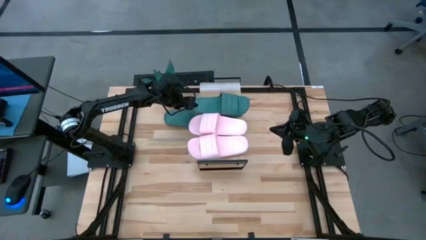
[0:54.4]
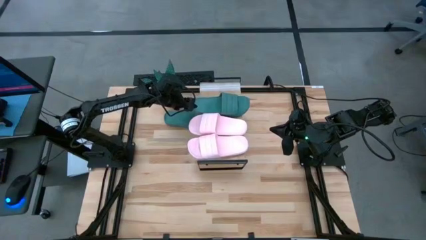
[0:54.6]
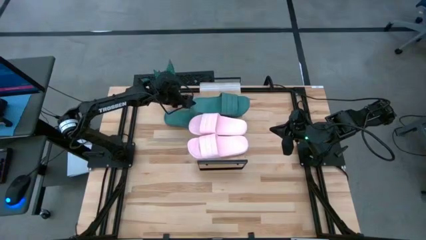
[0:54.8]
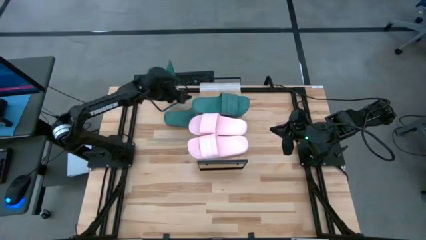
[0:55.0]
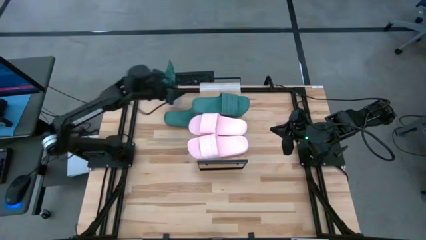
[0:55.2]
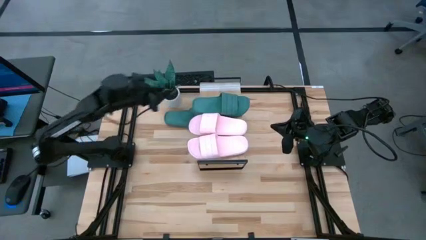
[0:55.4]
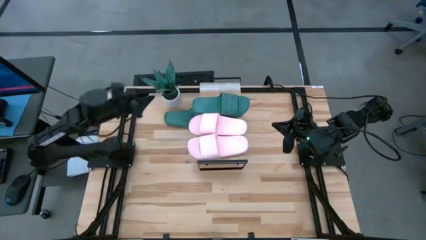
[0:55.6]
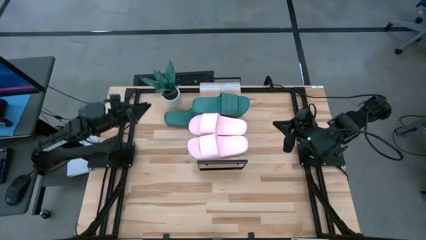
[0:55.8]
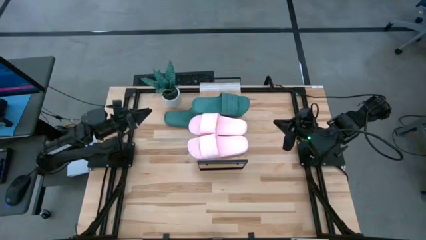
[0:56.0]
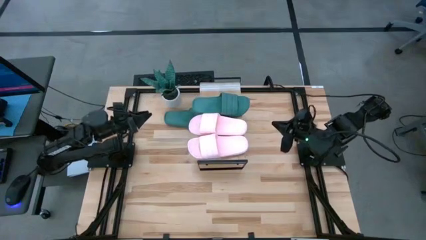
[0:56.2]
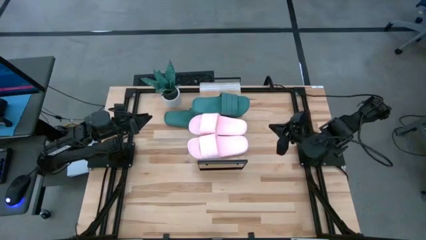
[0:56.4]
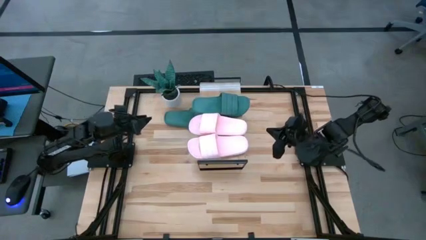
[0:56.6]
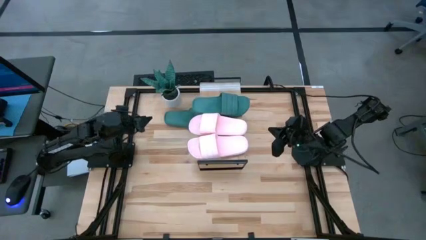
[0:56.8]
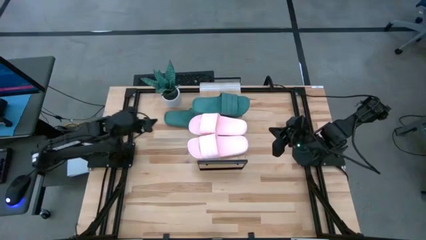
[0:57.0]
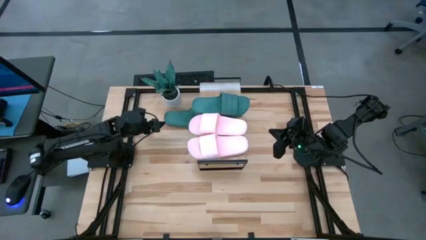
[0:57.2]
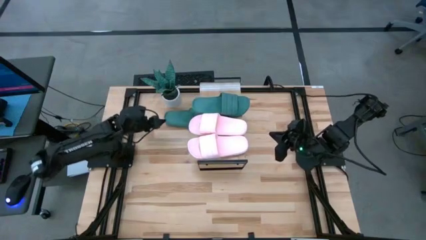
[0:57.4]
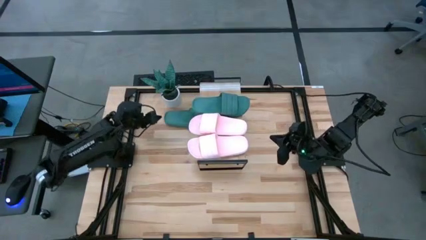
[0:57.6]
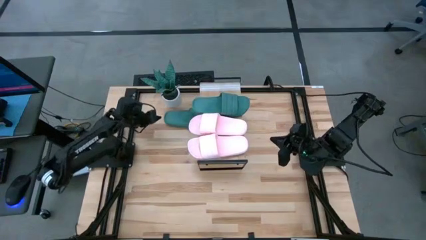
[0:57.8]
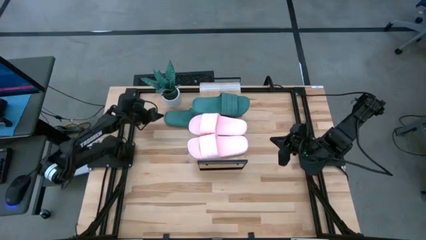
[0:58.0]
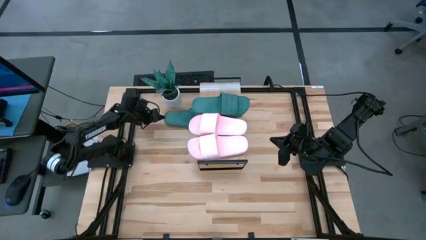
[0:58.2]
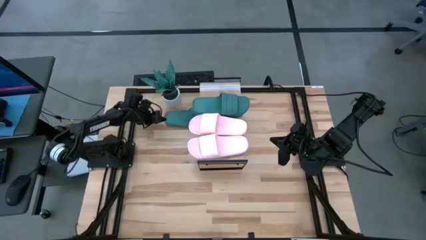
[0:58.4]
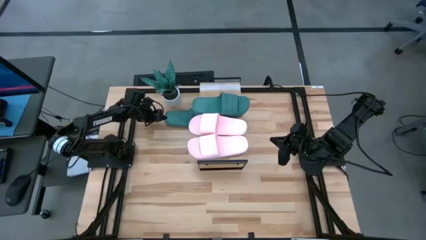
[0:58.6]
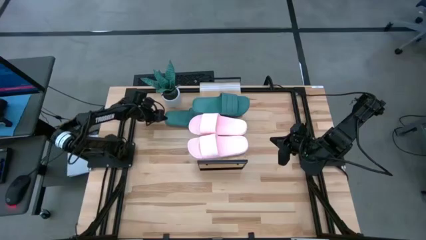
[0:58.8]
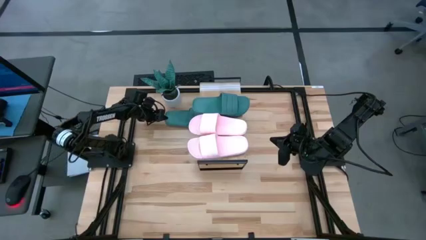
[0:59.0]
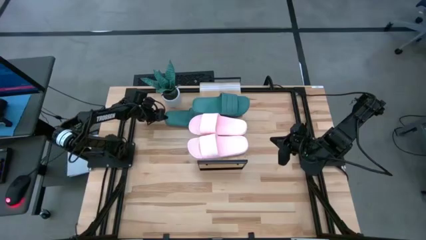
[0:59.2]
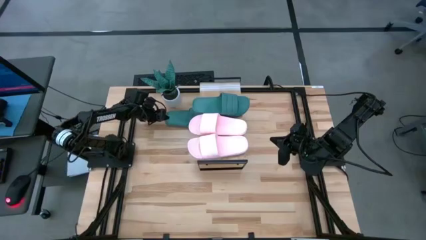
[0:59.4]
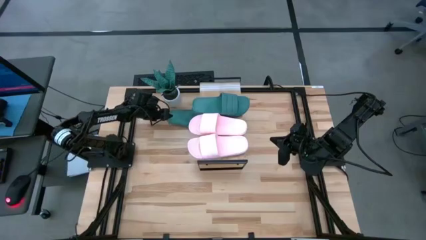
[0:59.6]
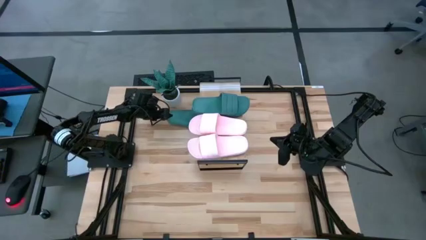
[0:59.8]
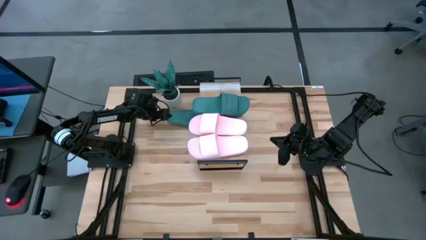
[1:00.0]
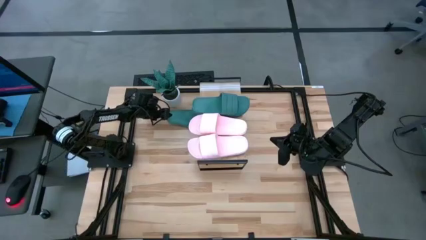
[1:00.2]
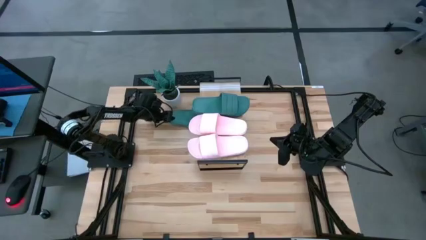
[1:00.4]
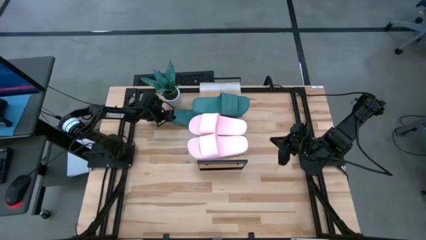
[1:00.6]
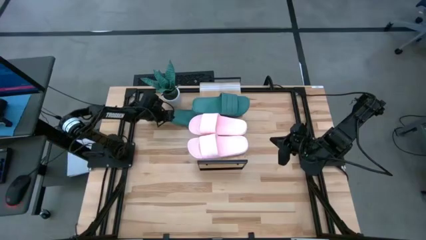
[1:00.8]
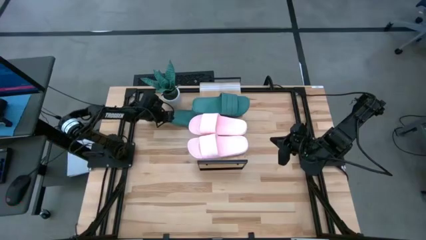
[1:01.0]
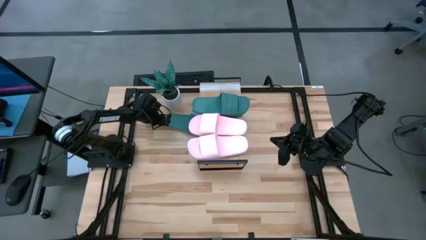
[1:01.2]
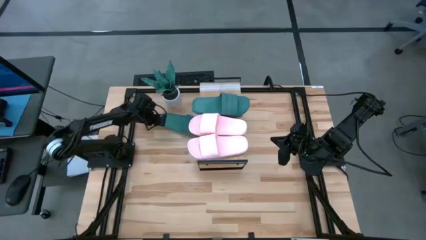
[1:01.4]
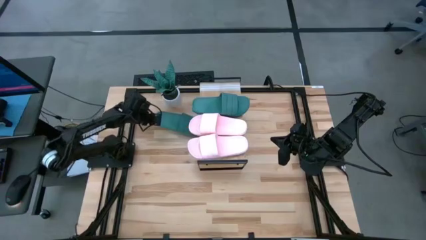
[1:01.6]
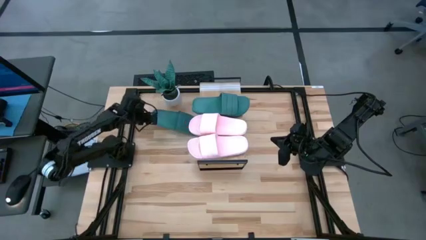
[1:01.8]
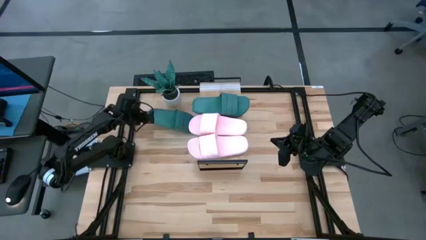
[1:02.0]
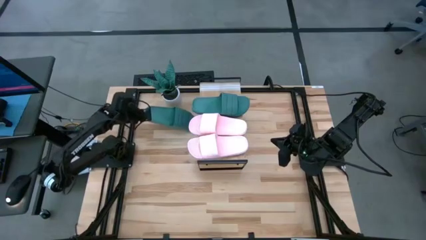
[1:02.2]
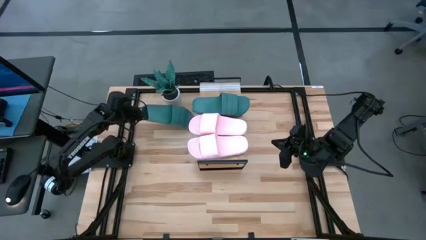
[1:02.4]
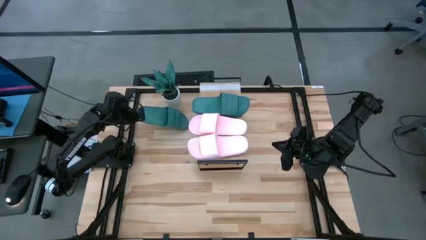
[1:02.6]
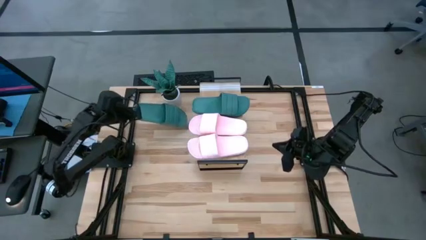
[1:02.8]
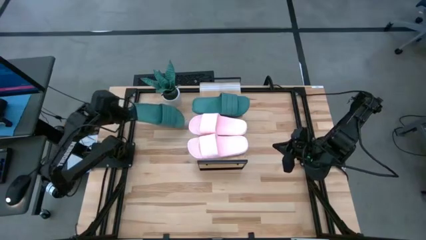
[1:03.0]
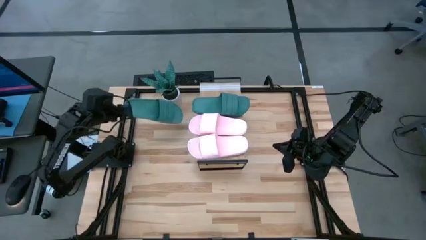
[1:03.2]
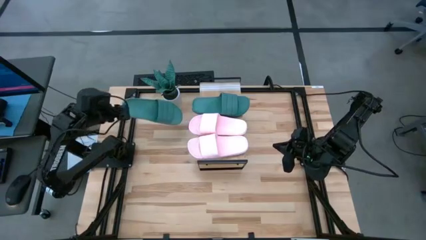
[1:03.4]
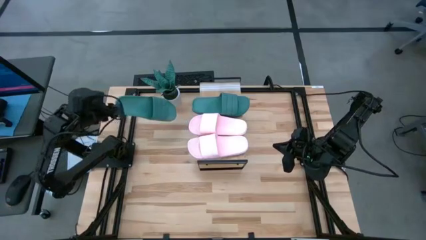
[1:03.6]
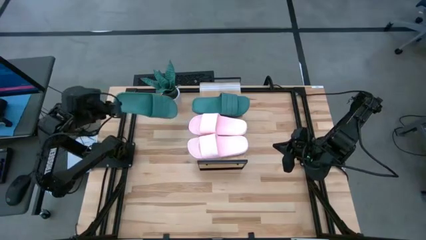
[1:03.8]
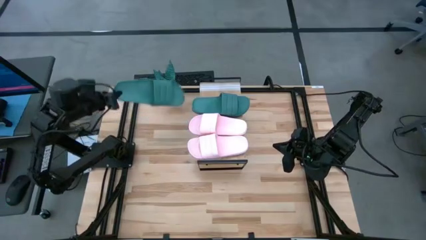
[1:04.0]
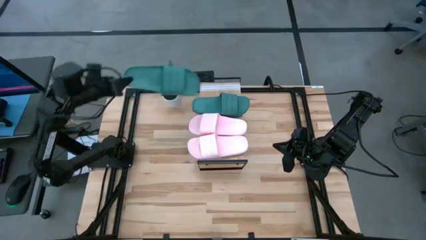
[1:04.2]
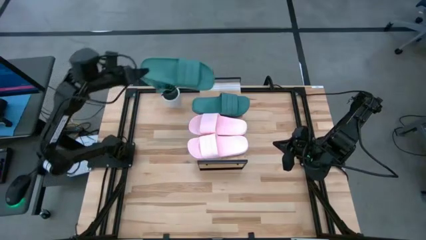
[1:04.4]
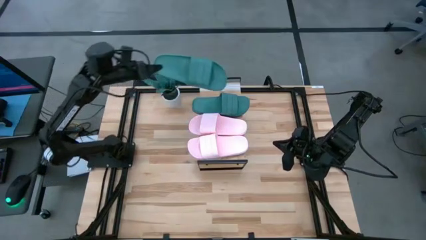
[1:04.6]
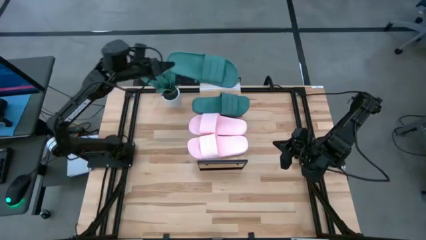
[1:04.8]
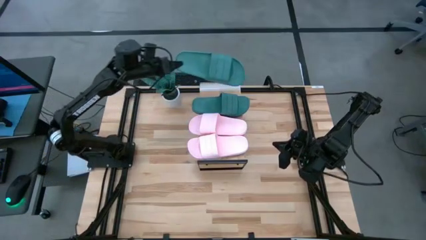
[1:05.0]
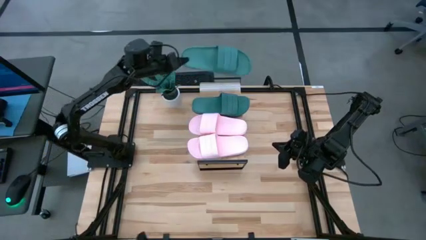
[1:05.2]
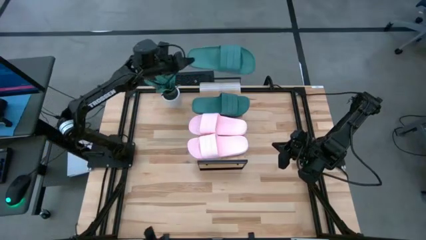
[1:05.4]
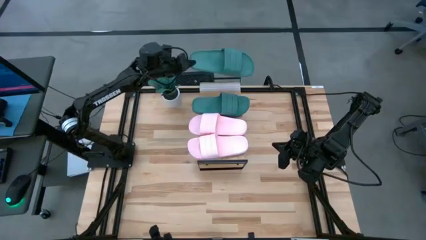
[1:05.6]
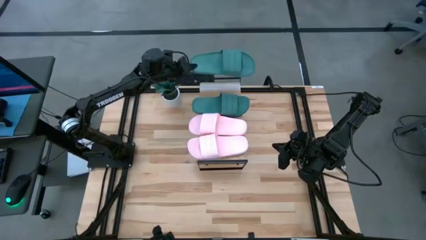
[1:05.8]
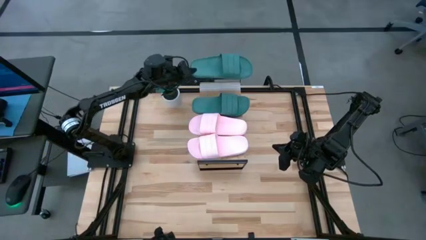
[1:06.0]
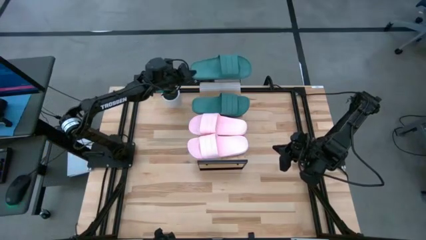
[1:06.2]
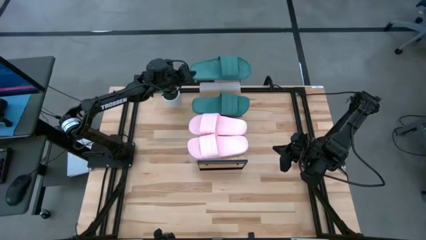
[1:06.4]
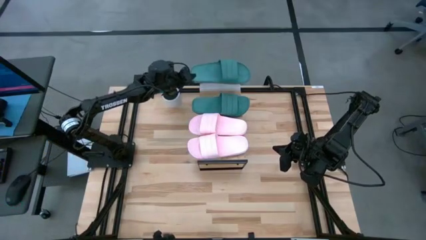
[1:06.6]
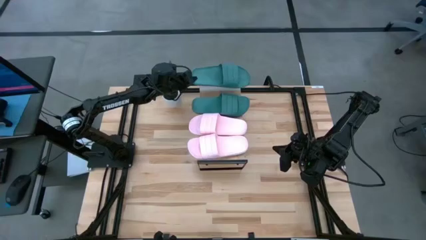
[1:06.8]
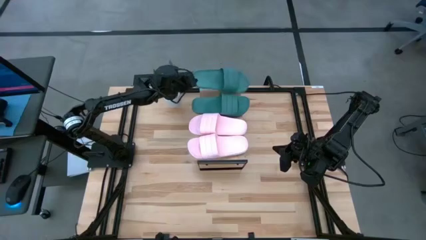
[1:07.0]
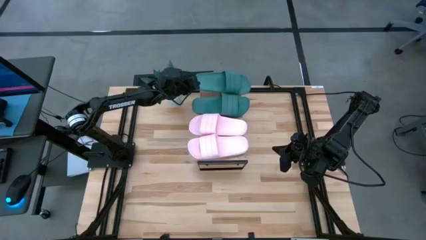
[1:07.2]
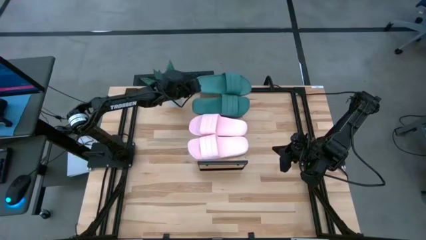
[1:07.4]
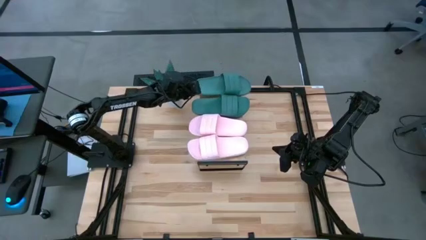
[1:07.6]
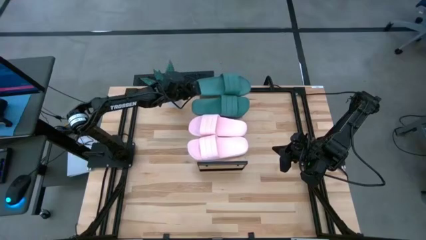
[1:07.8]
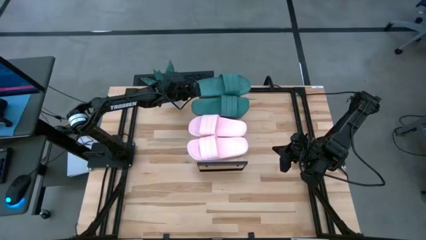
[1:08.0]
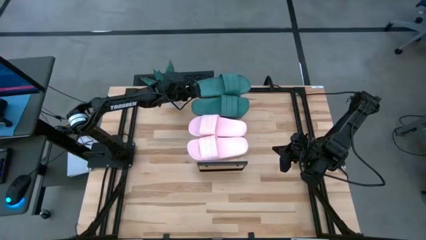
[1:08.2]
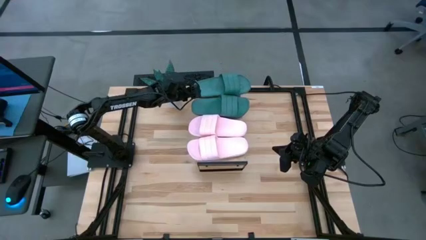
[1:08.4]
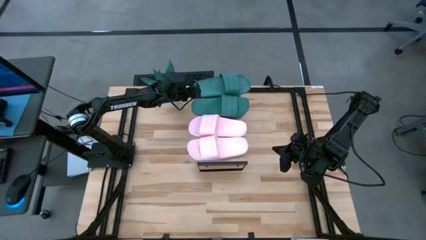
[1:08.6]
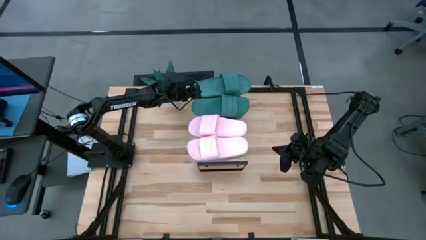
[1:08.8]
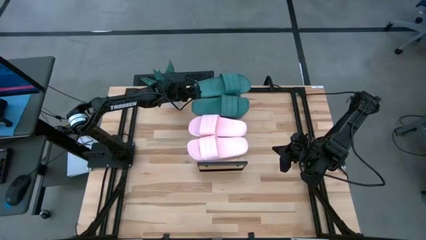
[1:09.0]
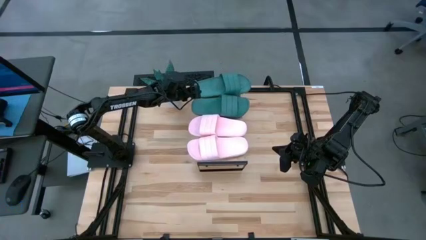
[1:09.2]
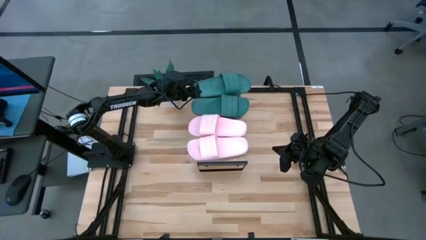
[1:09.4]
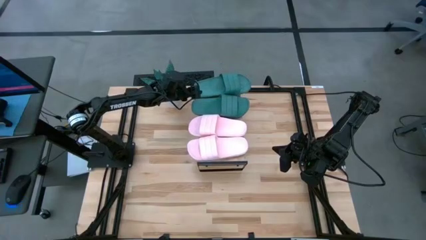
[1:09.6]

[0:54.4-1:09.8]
Task: Pick and place slides into the shelf
Put the green slipper on the shelf

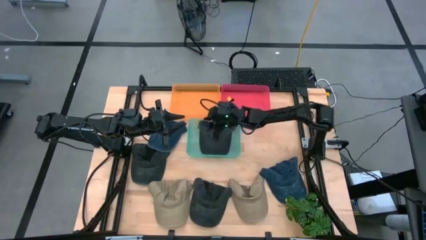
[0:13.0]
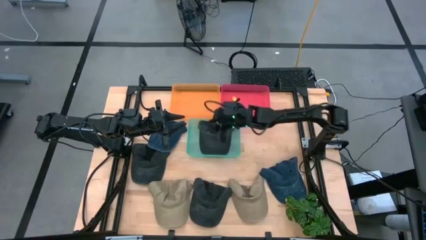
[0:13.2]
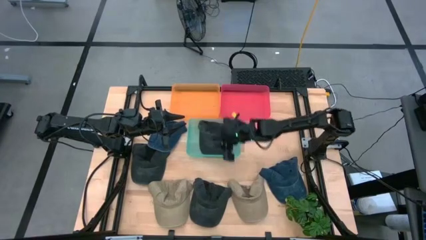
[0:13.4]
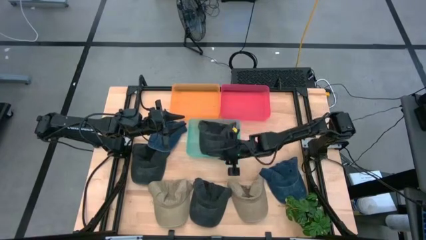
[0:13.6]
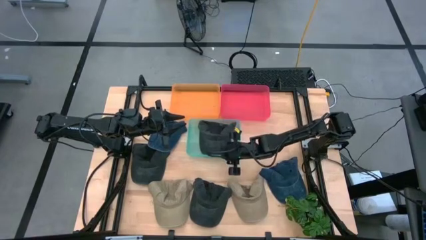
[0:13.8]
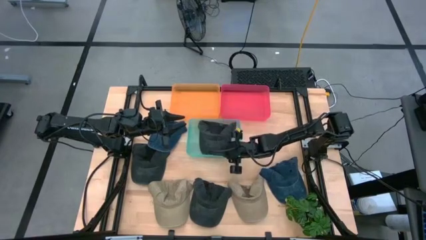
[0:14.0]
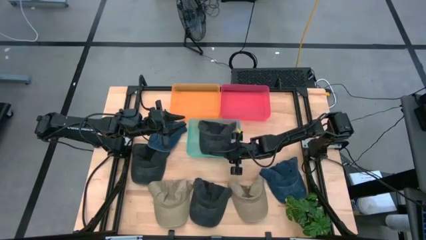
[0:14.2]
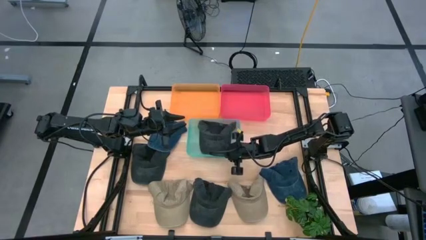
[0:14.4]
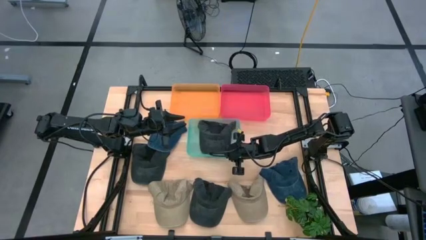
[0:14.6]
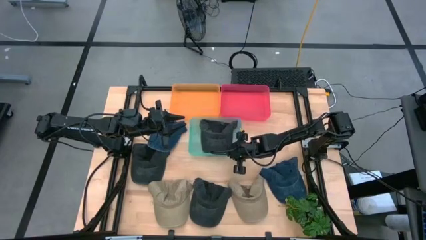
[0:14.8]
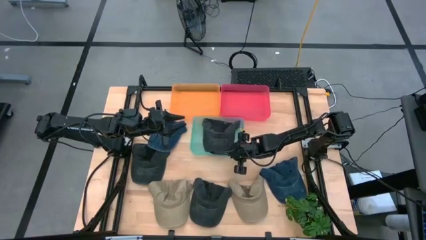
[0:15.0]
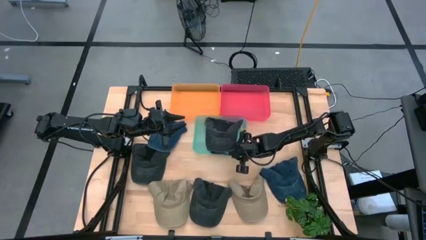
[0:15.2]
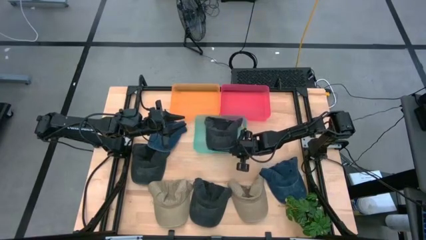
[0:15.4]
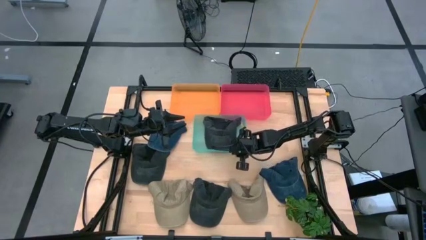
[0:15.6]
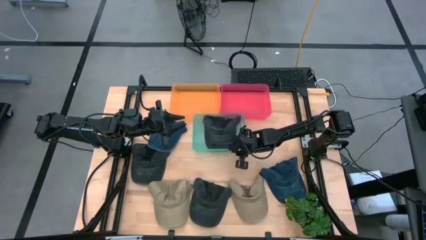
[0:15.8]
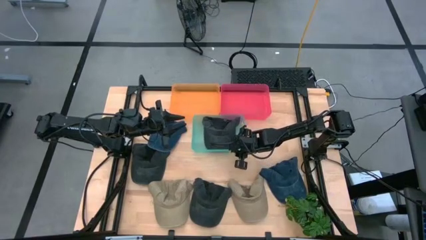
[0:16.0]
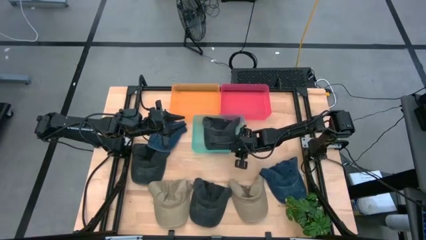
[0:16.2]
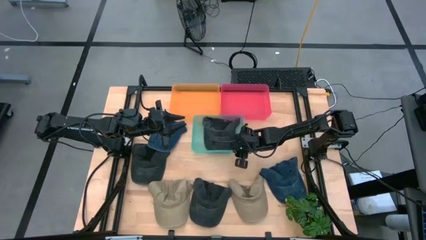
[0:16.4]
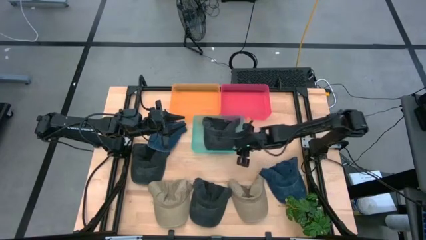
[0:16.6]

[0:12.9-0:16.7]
Task: Pick & Place hat
Adjust the blue bin
